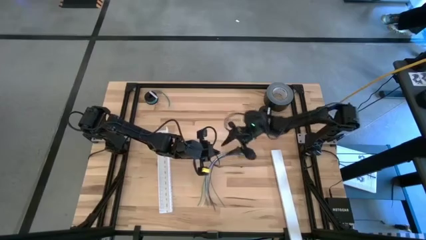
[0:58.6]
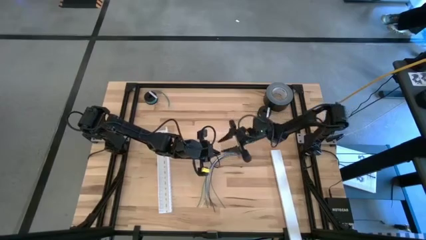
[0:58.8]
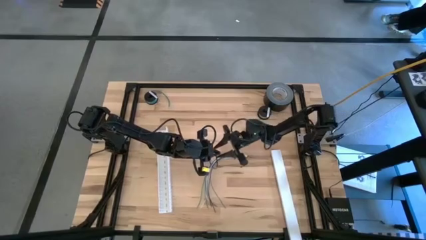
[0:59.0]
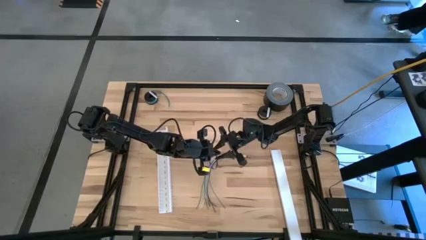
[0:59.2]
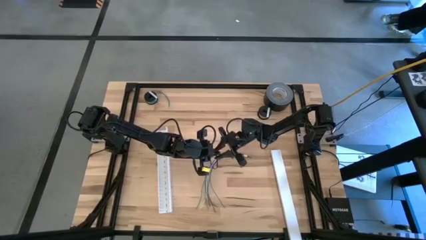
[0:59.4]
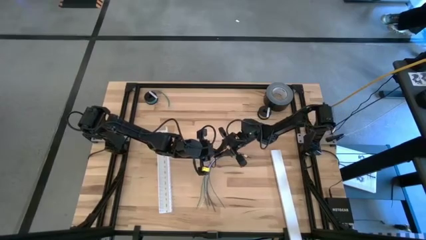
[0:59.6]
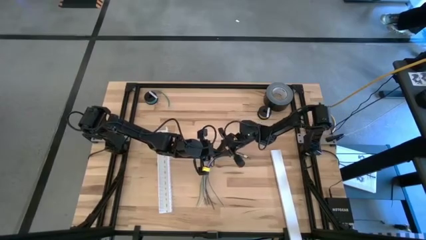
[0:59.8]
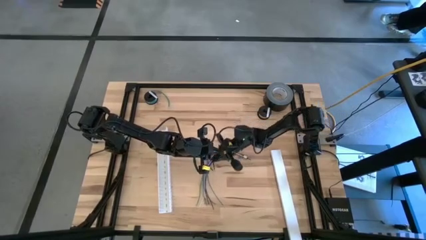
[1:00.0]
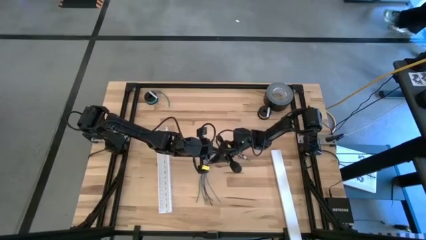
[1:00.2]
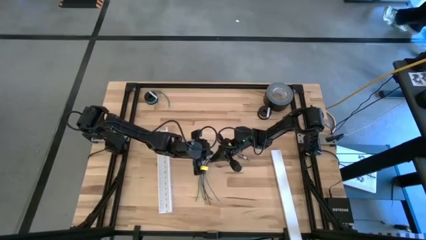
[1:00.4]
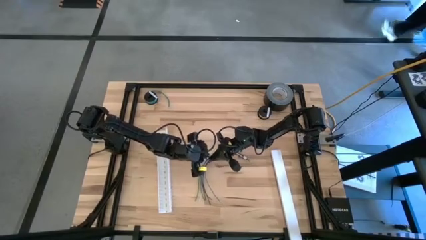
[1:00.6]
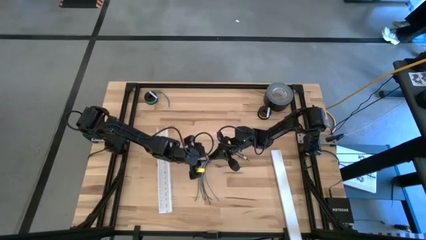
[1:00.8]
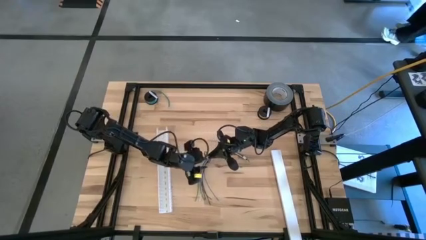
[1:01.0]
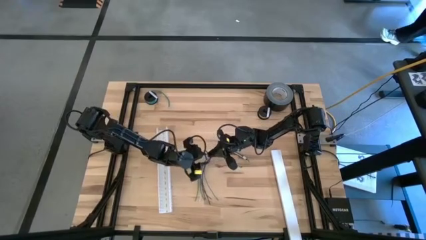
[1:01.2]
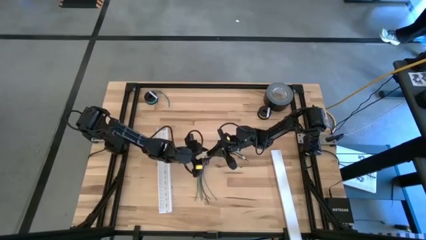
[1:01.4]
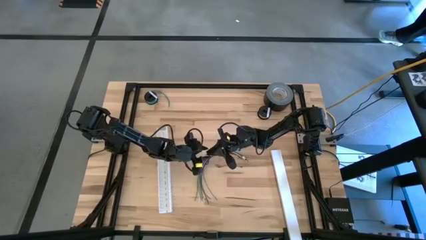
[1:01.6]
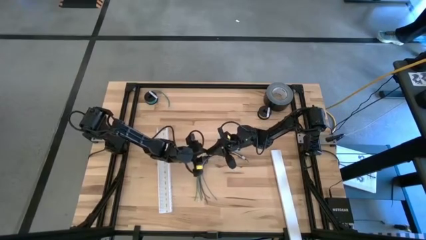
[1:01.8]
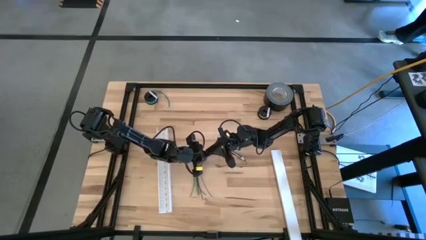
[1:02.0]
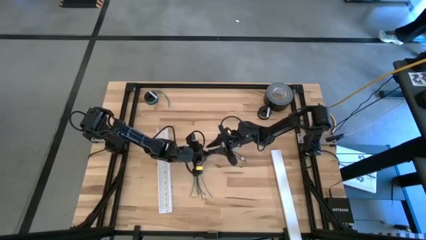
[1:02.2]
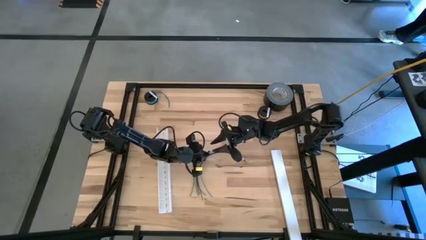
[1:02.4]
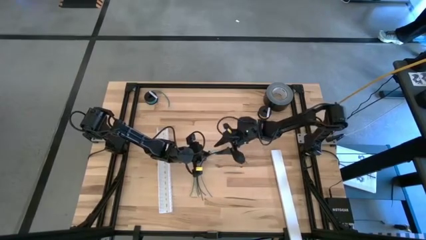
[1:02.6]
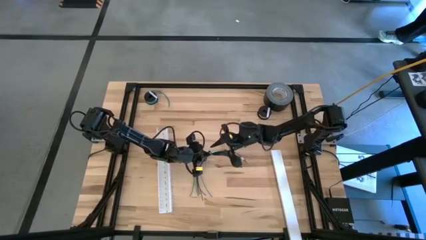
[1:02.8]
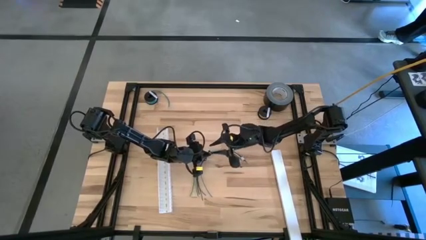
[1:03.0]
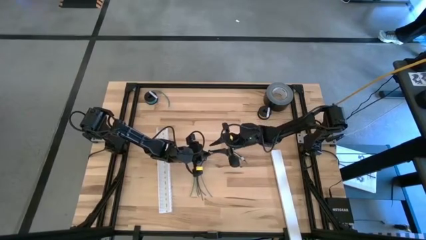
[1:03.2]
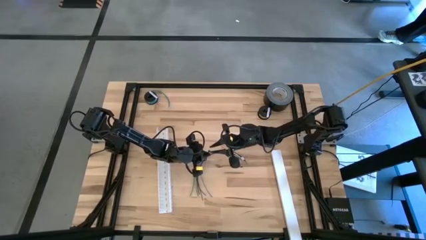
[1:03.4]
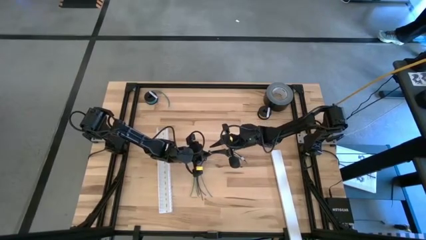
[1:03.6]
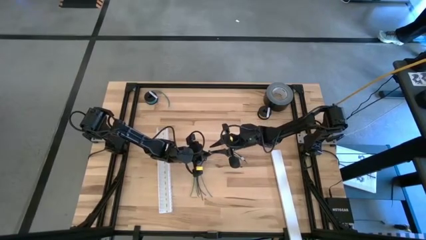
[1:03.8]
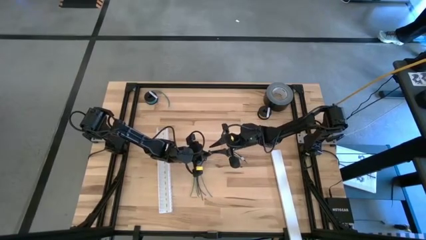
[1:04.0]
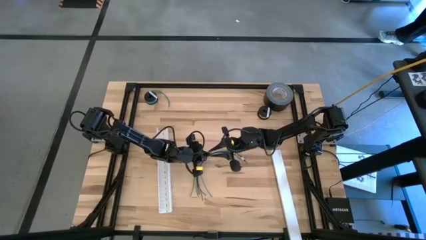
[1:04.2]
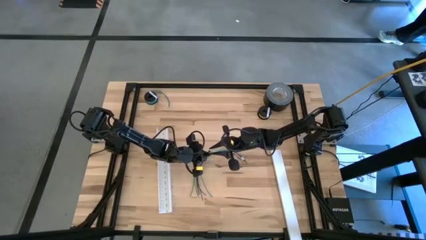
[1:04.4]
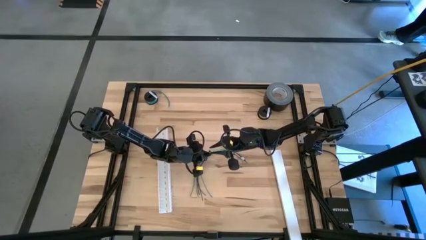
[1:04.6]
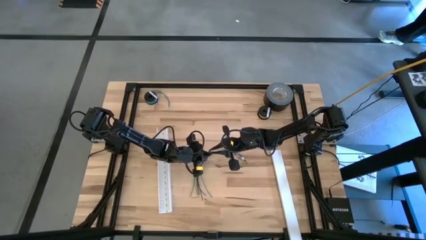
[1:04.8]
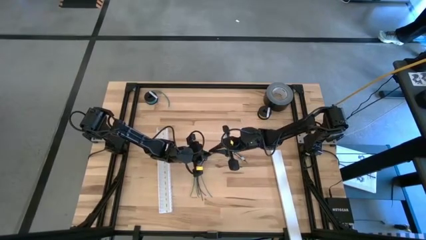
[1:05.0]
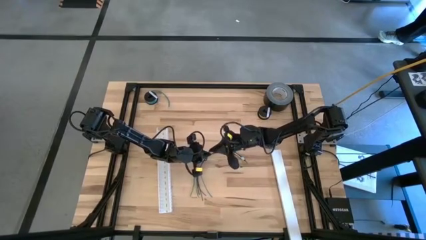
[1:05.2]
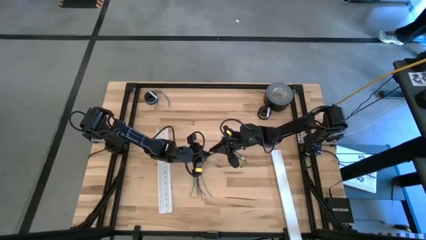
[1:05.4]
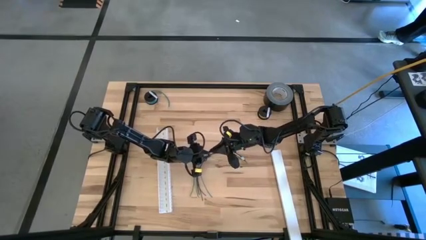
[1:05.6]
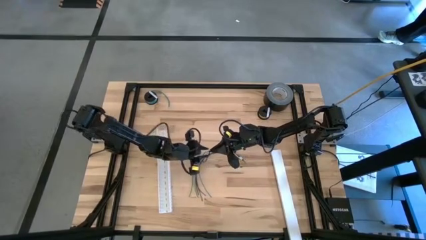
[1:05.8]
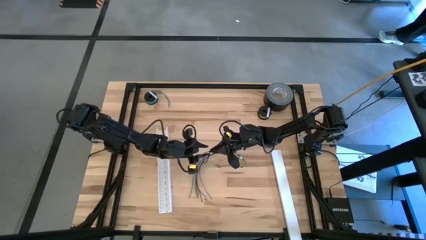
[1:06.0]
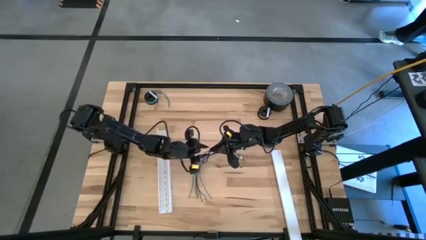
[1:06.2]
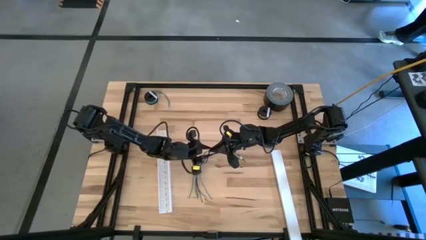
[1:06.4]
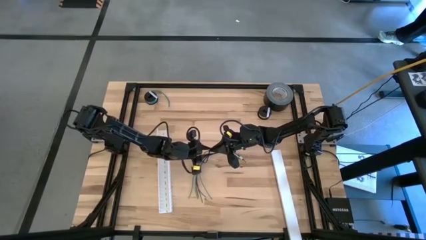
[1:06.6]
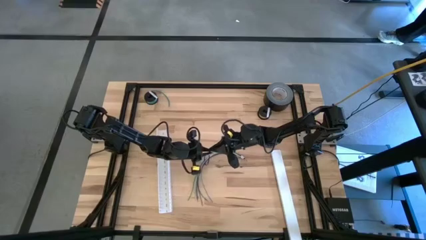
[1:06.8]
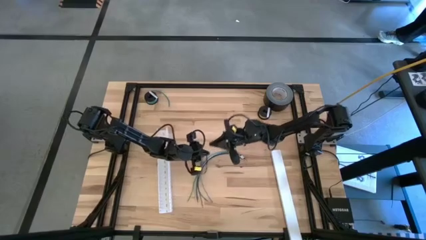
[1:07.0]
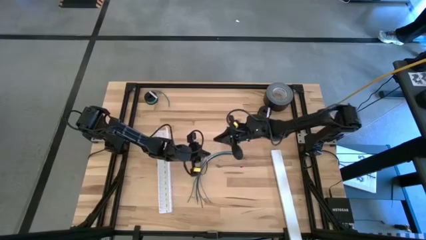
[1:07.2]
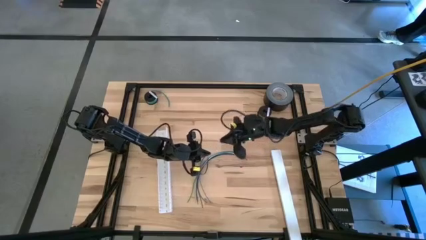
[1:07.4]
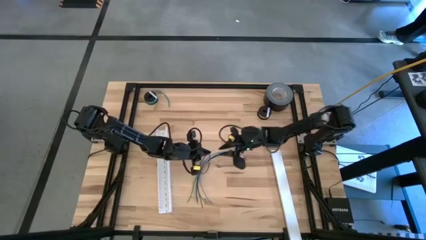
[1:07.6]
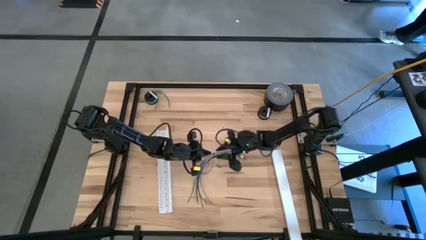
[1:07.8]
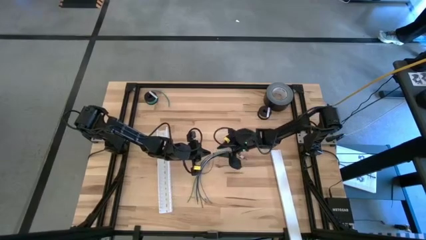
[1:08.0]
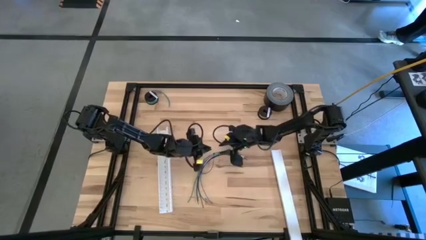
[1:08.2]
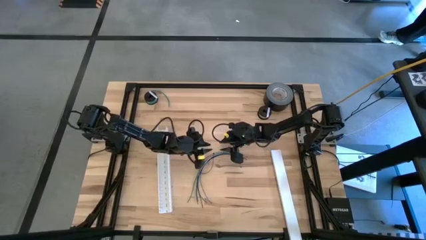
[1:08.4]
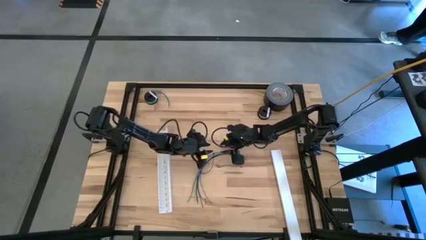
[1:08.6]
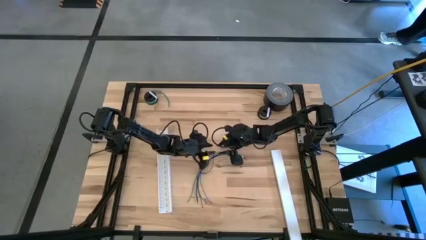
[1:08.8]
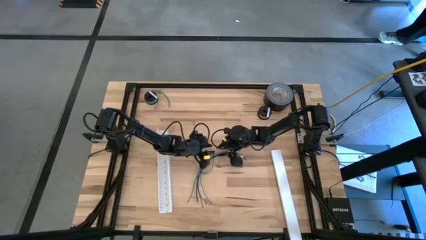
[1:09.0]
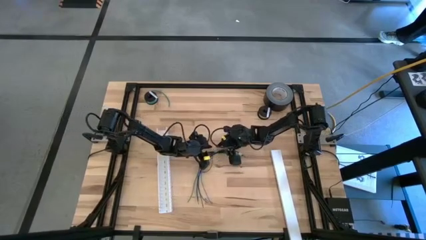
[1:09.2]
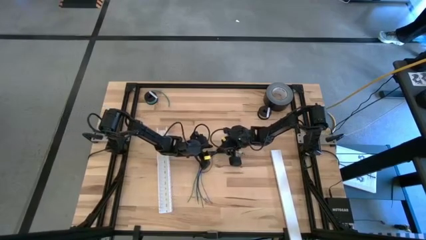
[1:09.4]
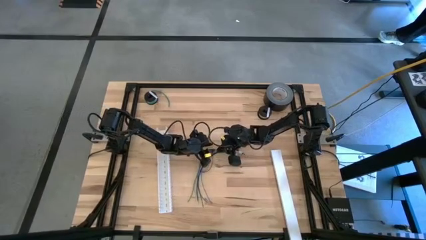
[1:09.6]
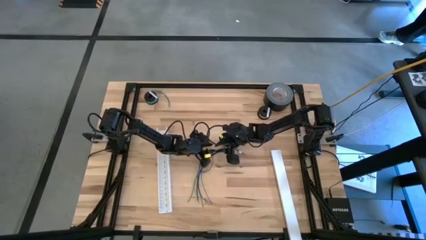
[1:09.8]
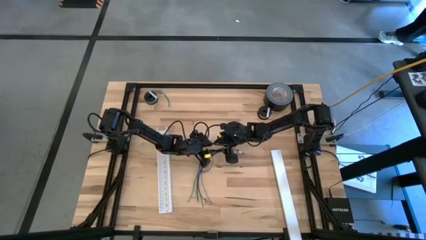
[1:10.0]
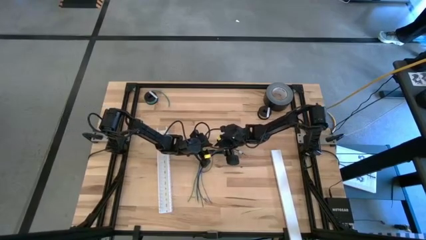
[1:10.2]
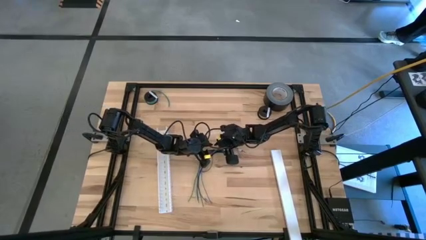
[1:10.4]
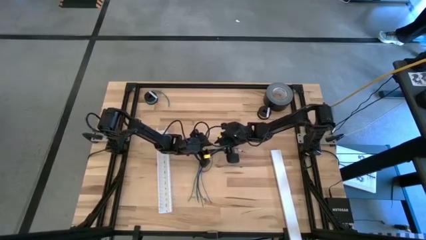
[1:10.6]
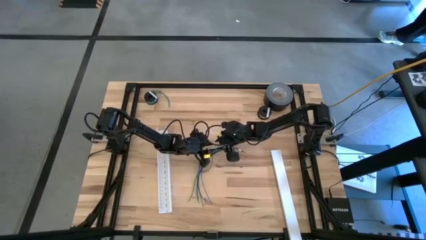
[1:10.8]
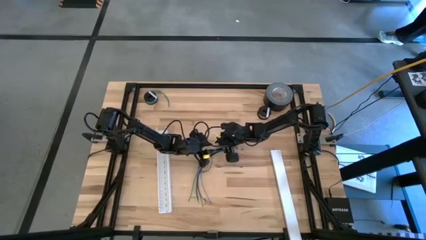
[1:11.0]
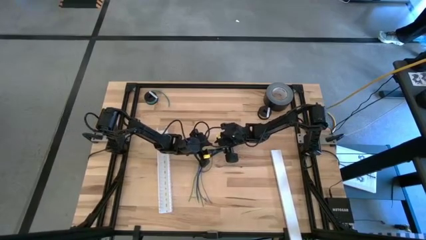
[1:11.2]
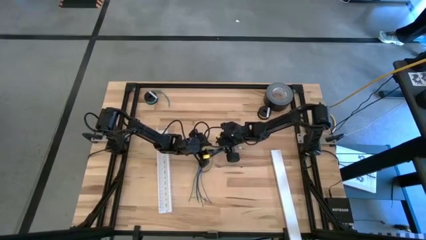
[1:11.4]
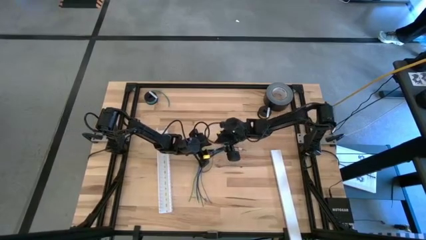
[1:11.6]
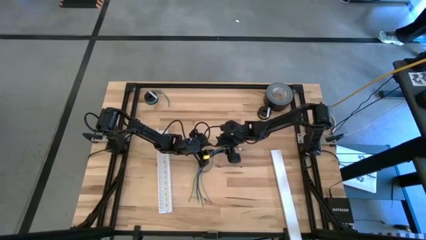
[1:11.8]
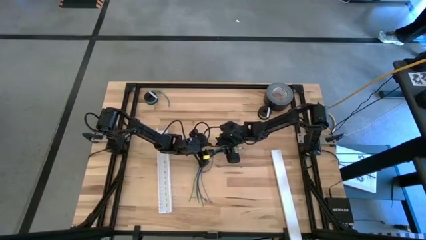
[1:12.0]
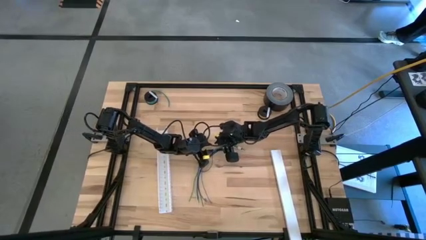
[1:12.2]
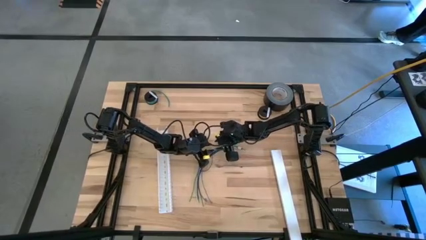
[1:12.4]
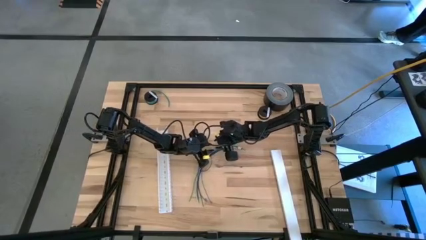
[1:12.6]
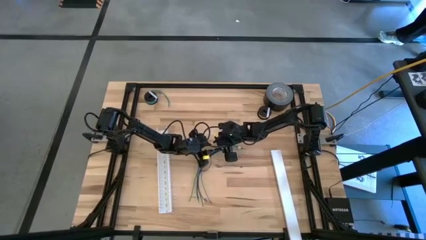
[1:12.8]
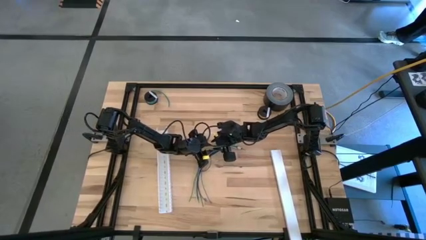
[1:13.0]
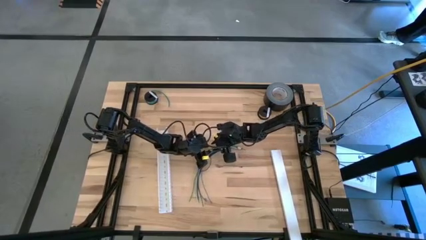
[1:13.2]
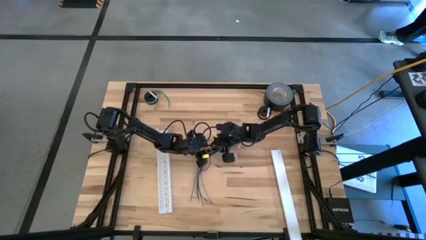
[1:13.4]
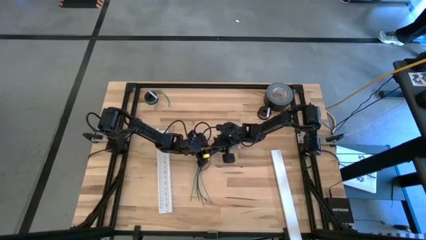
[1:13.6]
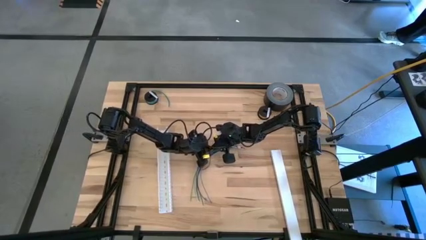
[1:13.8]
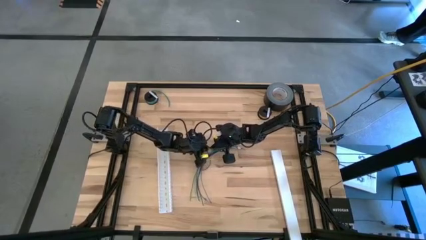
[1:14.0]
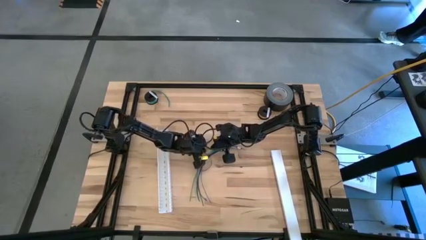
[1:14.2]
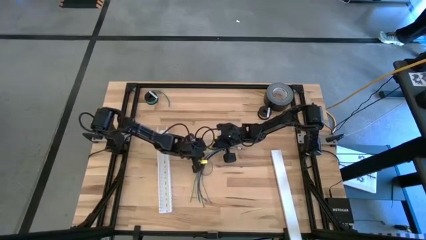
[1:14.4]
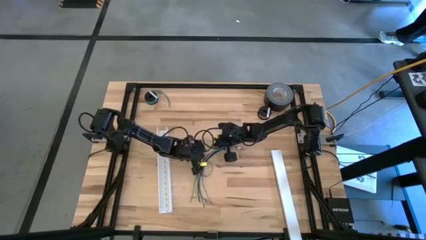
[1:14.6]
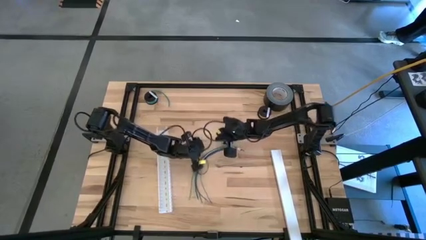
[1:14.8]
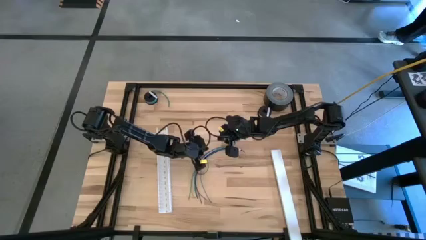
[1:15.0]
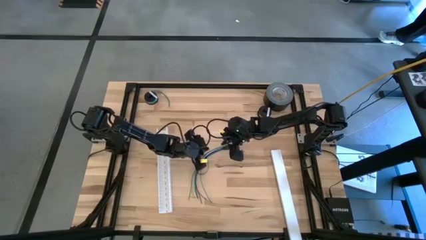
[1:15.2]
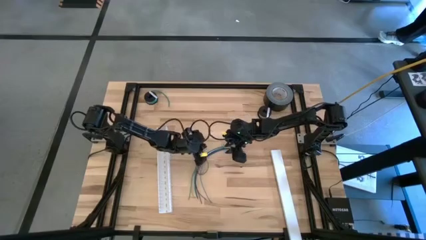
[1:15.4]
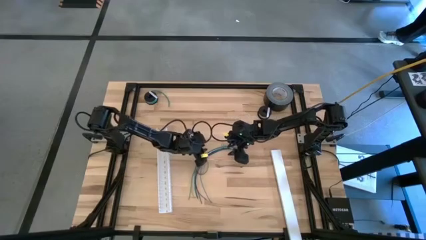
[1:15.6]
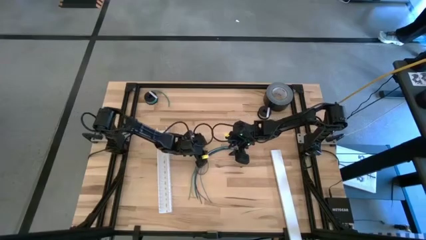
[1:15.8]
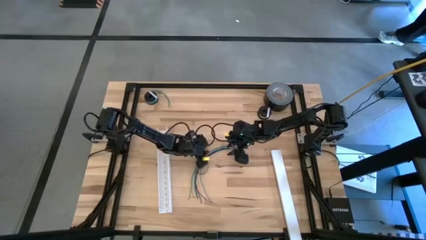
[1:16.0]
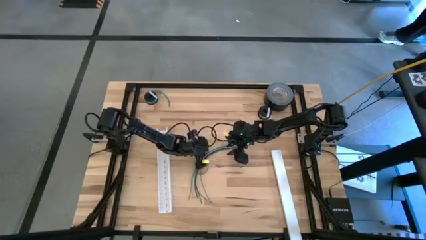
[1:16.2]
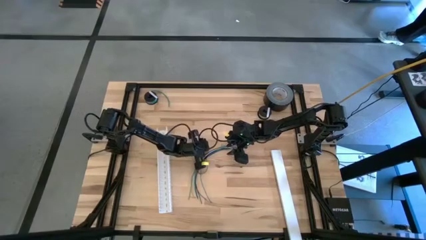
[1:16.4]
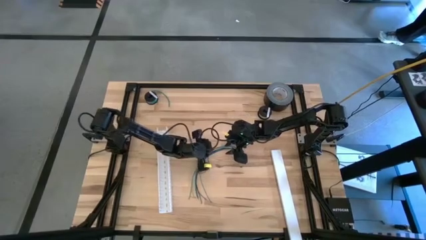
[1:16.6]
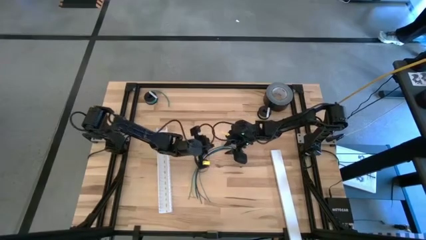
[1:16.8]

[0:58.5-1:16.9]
Task: Ziptie cables
Wrap the colored cables with the black zip tie
